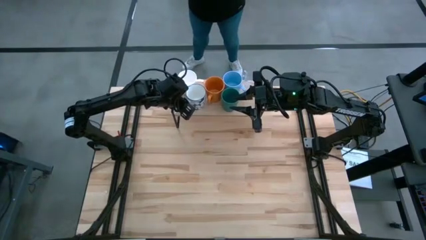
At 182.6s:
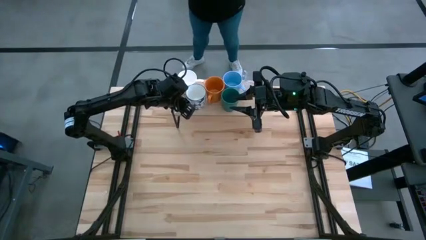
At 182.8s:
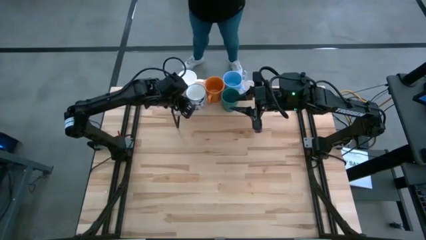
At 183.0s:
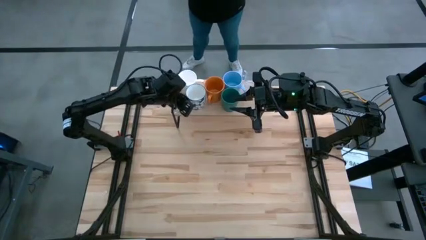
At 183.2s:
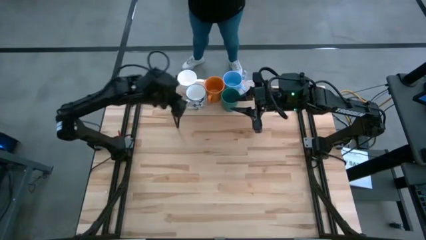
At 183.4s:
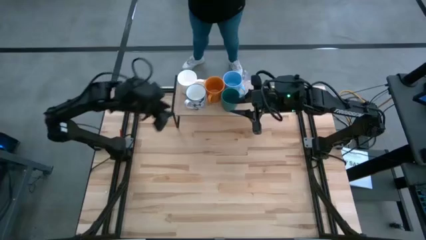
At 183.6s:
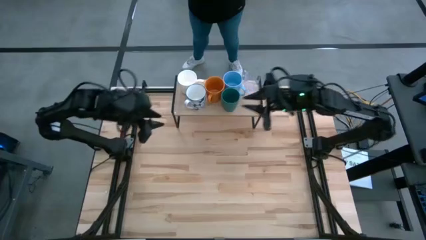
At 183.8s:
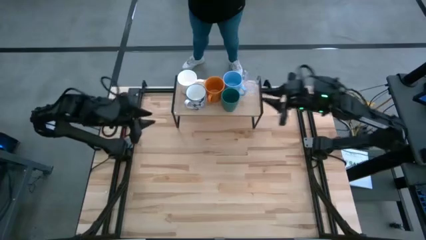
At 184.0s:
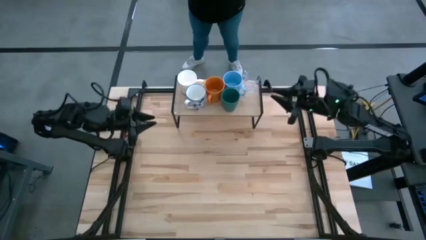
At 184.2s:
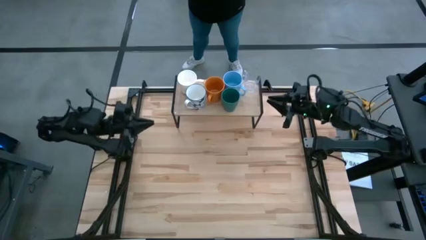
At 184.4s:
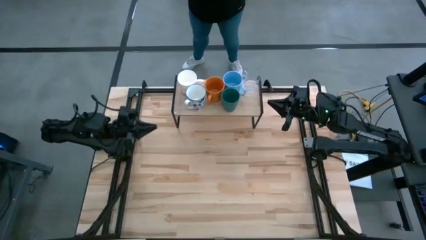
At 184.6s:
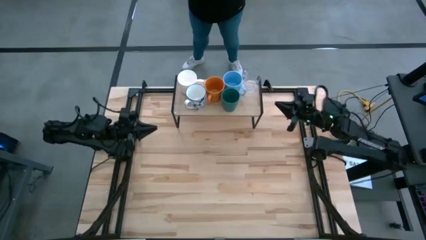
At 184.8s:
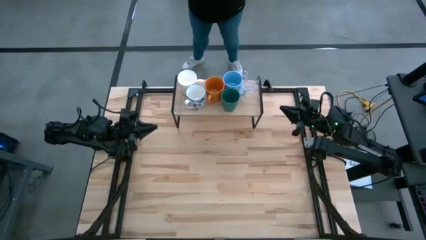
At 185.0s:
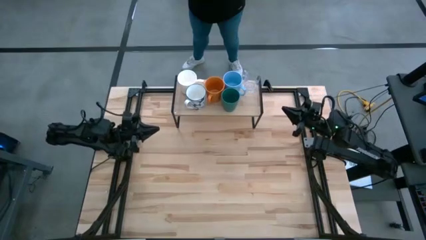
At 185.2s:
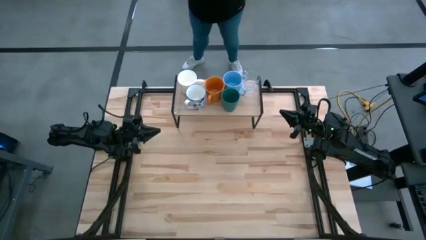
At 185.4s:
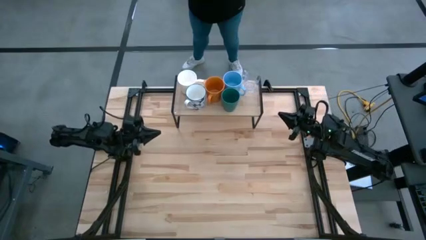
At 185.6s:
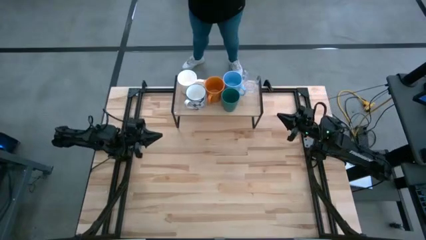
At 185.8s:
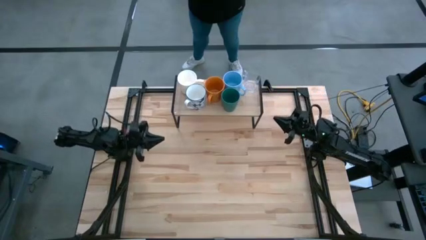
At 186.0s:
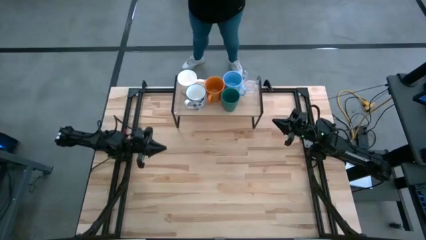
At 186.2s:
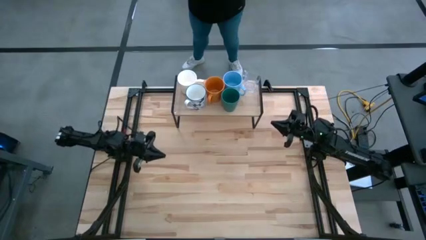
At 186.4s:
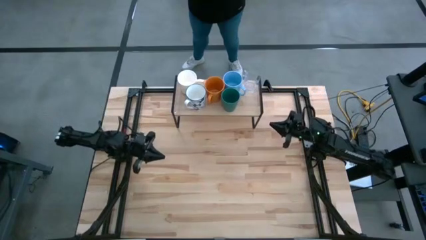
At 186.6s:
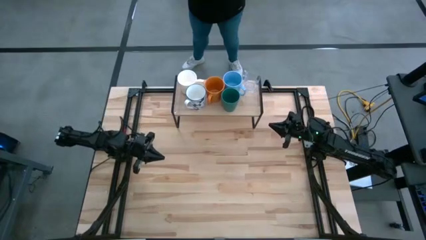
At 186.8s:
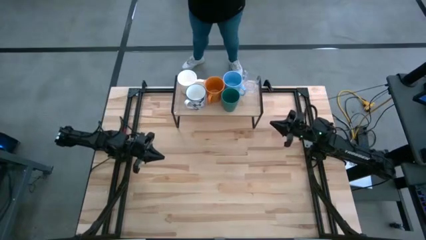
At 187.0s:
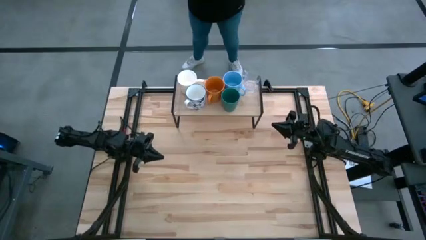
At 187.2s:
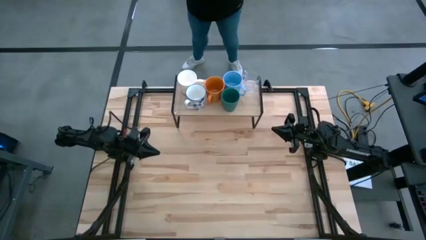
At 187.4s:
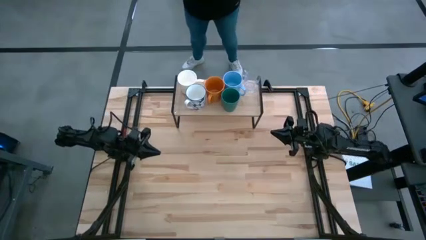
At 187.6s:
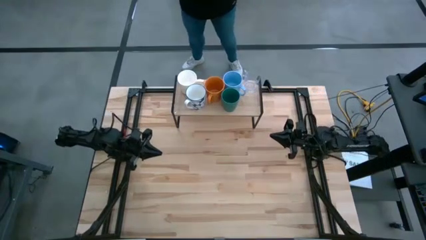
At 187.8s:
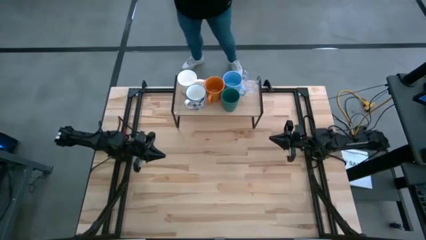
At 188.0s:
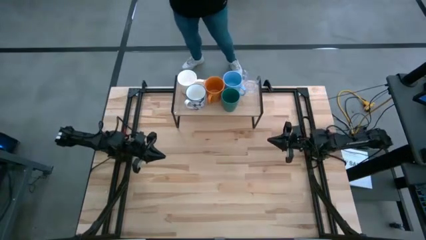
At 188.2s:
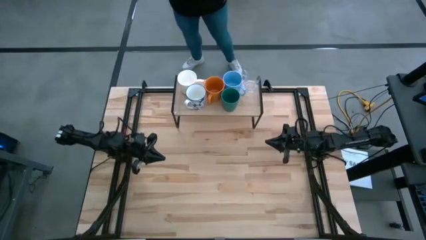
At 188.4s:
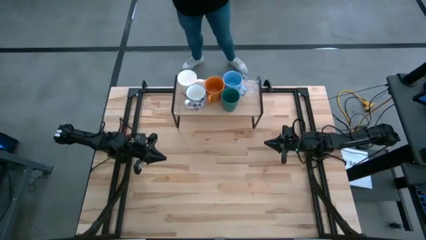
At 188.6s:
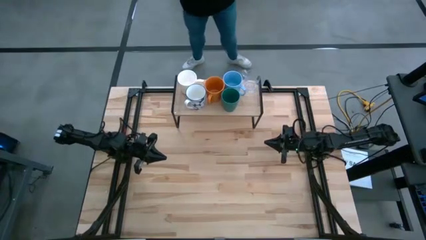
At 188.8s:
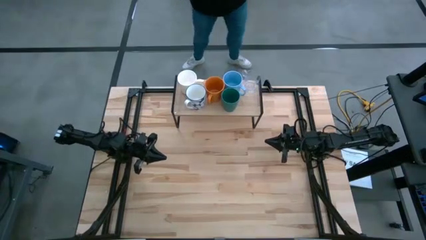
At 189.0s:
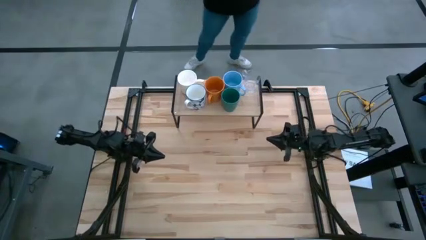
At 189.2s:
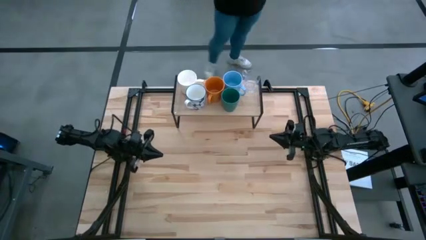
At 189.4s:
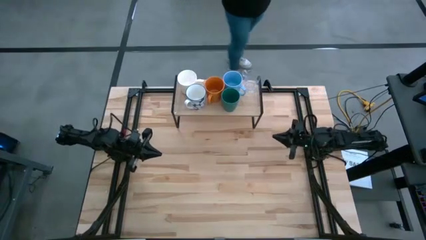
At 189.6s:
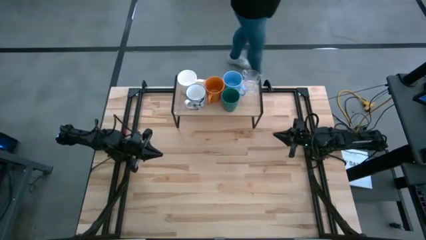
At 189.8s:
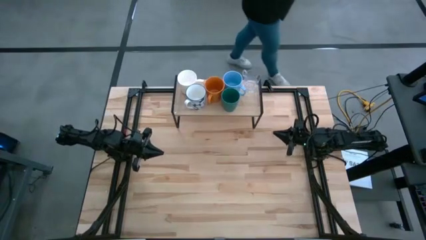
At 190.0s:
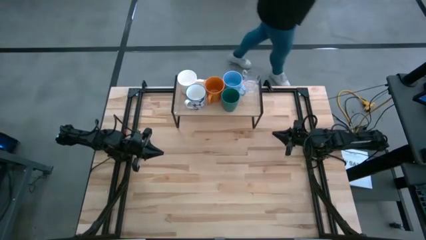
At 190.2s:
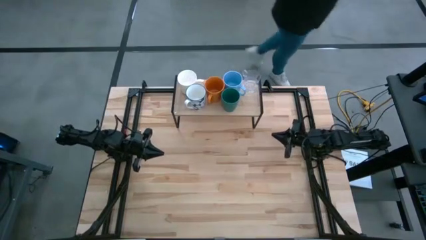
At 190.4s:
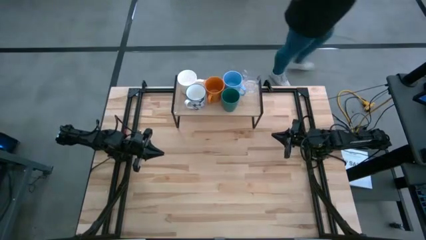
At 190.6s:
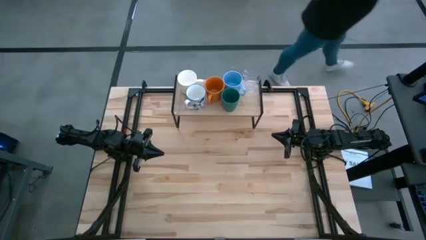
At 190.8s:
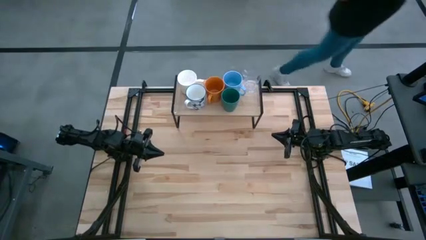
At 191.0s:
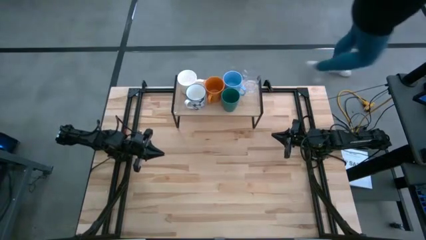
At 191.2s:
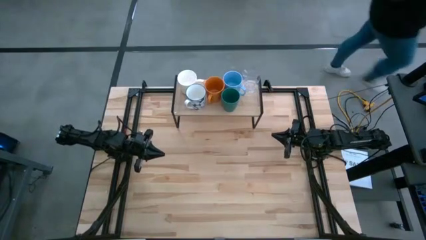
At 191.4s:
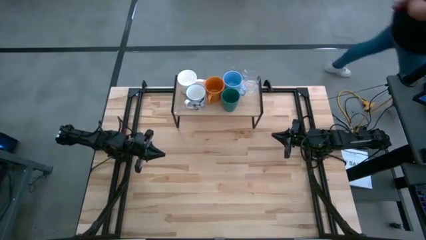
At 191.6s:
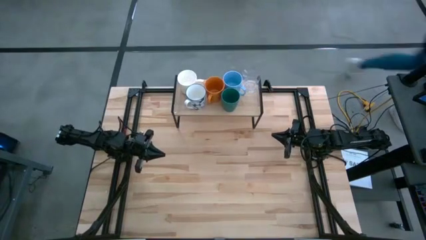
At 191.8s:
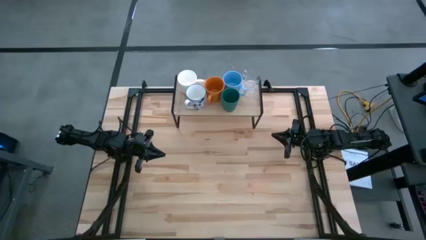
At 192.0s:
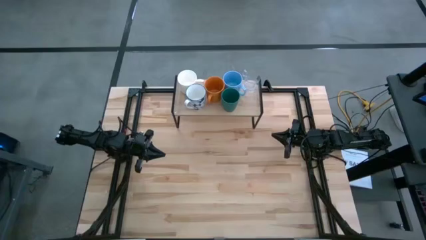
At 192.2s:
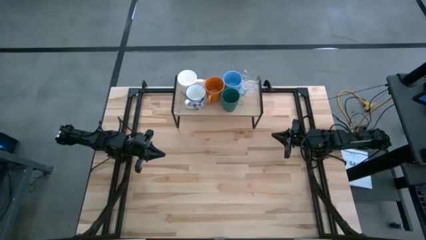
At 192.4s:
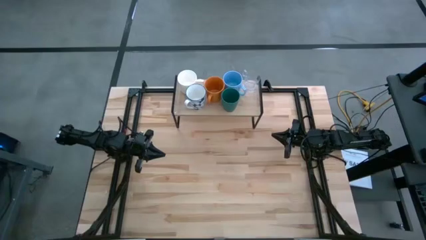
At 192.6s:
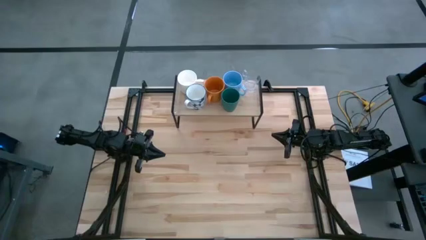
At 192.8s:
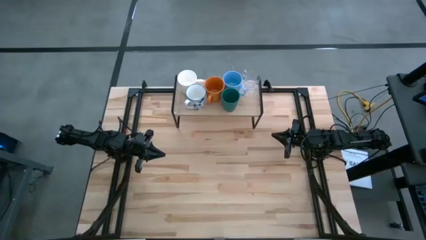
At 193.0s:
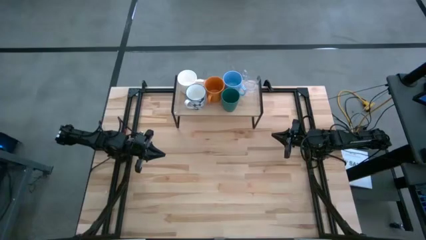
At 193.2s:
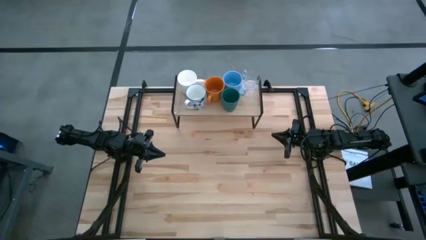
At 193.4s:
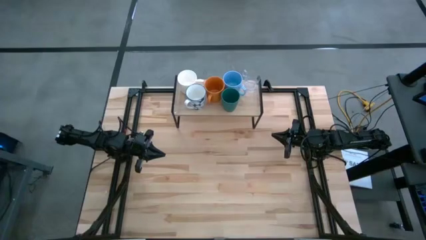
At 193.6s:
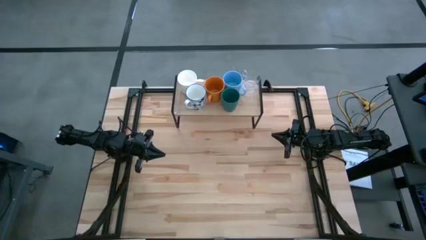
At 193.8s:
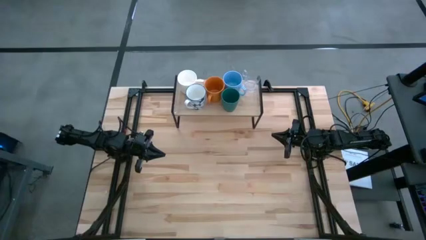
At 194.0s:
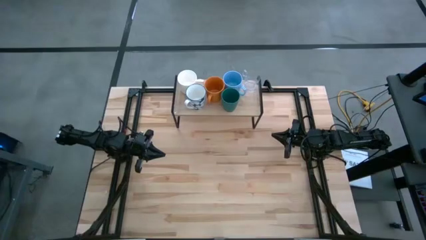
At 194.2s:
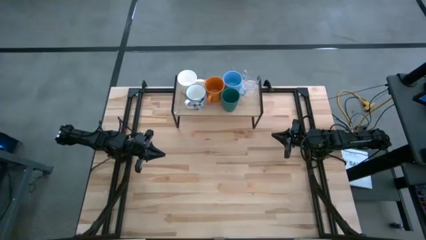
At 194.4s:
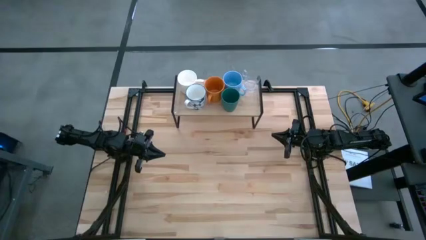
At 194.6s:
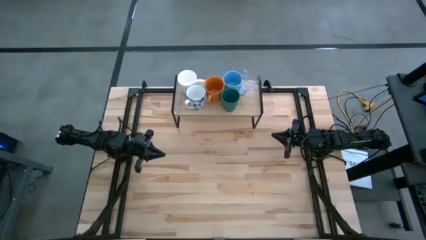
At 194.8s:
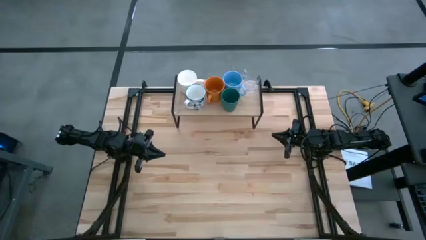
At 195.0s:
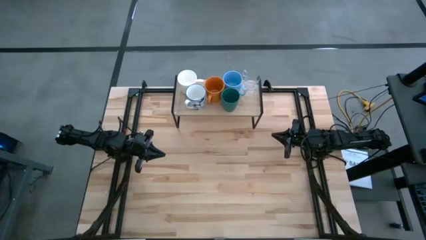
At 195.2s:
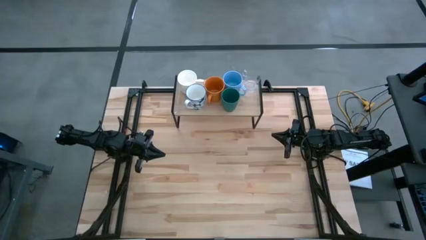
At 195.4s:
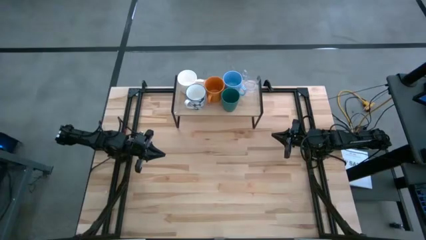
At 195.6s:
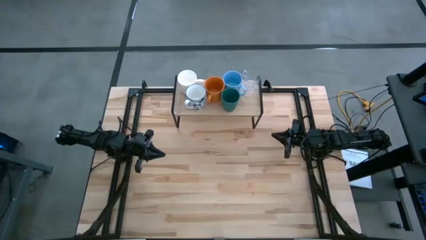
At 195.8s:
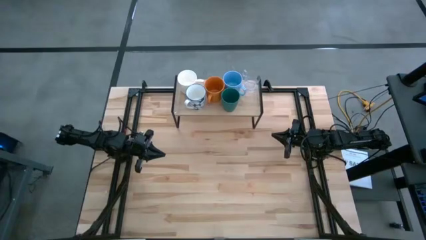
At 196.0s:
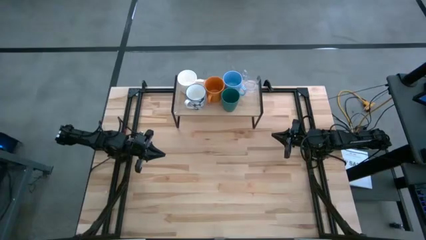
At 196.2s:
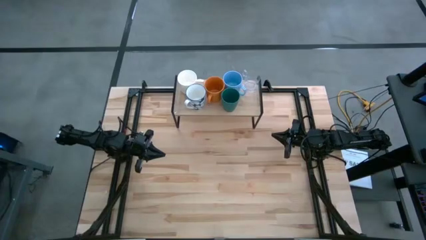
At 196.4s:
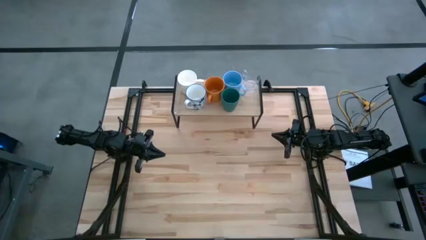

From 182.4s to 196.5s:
Task: Stack small to large cups/mugs on shelf
Return to Home Position

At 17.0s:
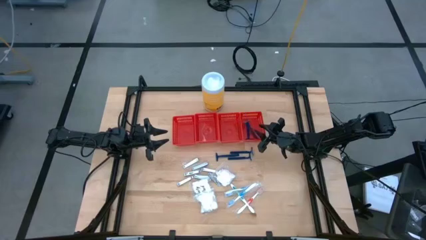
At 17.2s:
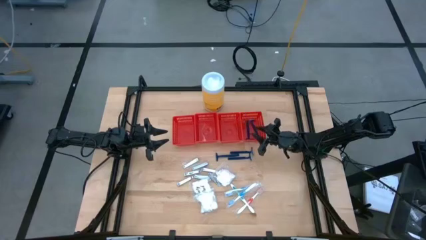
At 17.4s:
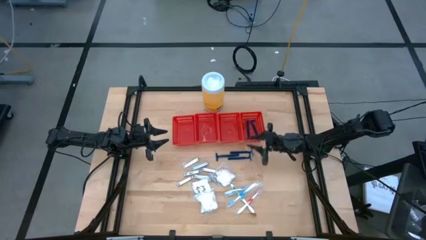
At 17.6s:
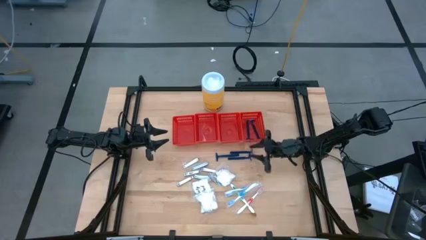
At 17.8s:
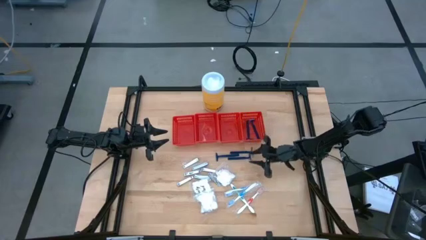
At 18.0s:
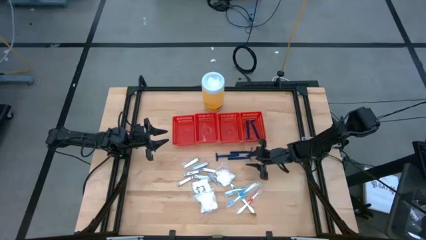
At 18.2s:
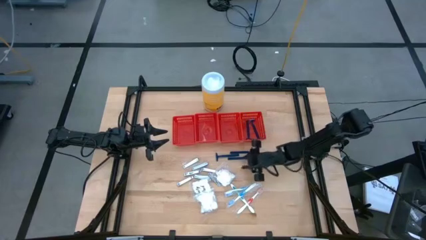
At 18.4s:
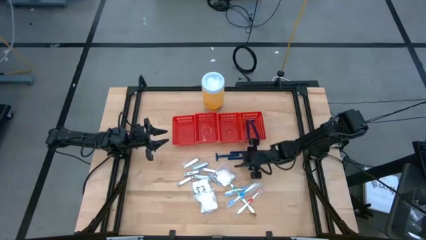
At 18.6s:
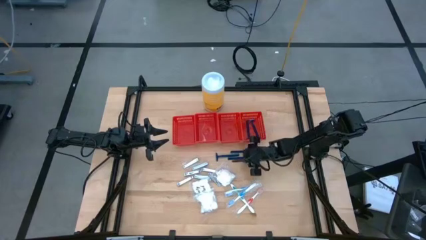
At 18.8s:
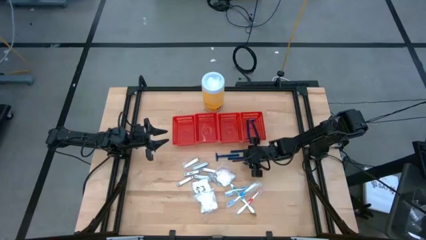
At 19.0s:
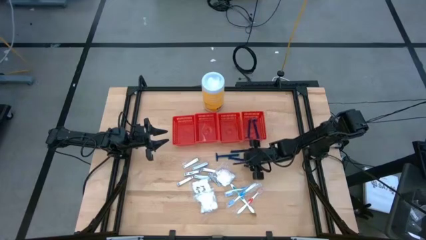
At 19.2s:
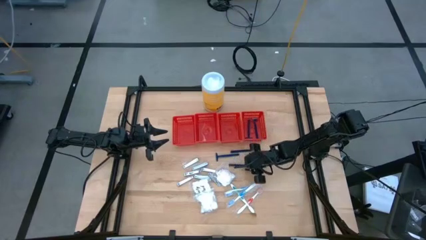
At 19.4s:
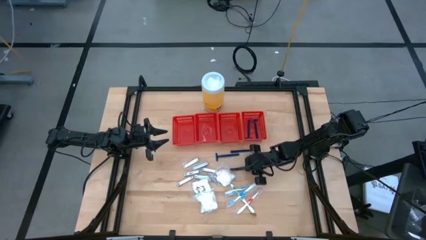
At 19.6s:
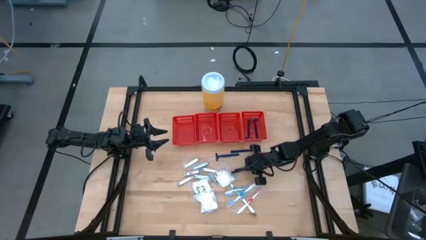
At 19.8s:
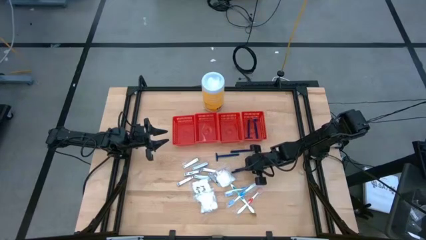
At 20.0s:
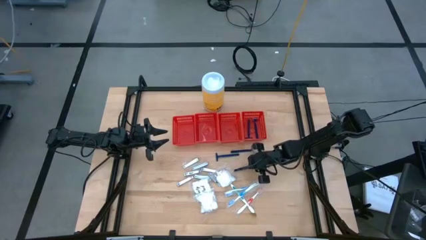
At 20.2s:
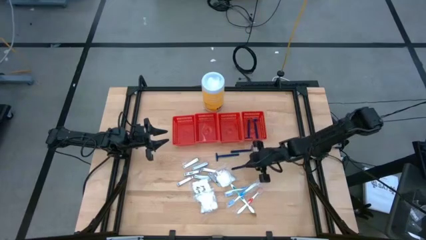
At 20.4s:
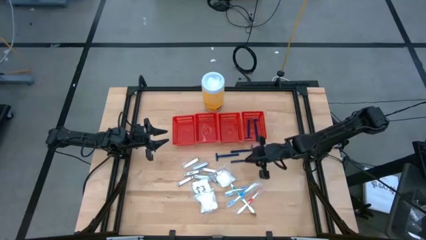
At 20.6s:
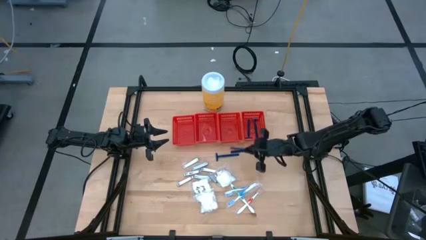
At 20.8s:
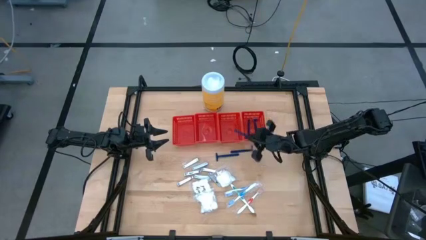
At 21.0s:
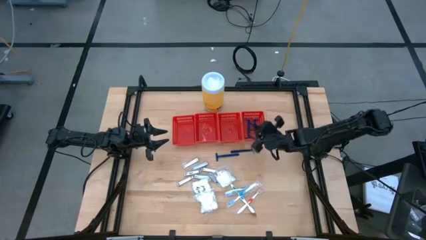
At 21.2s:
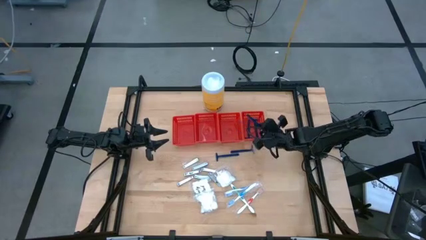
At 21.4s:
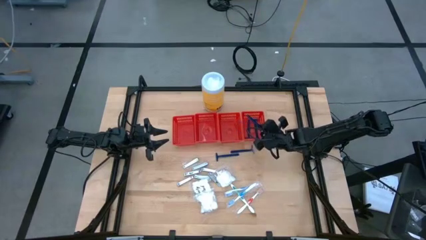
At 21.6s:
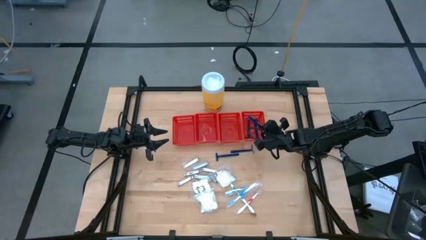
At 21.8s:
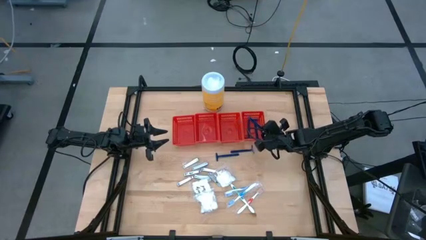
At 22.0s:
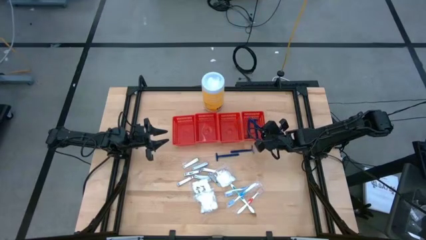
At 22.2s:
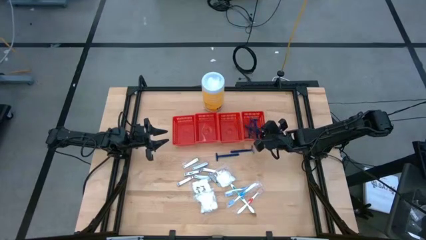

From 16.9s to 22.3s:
Task: Pick & Place Travel size toiletries
Put the blue razor into the right red basket
